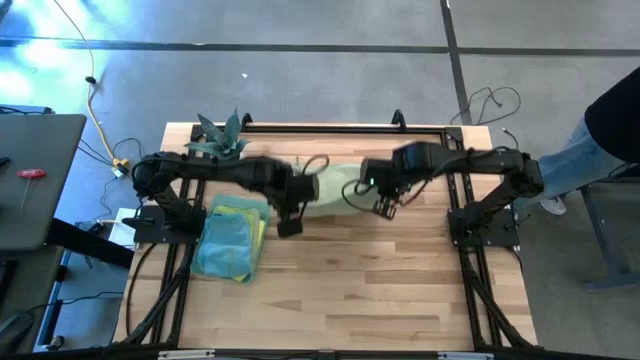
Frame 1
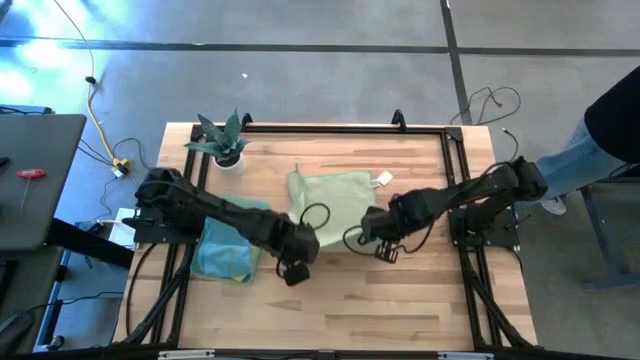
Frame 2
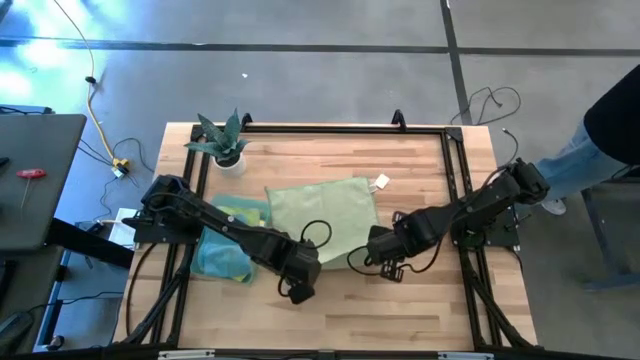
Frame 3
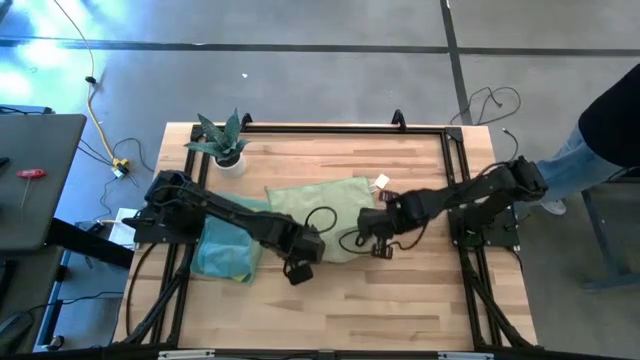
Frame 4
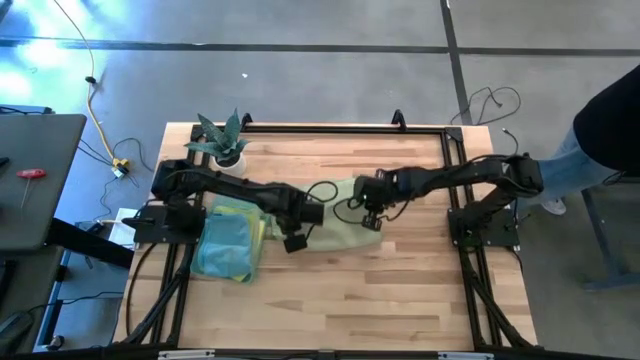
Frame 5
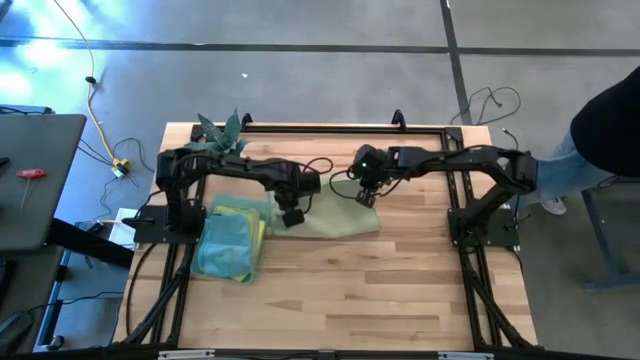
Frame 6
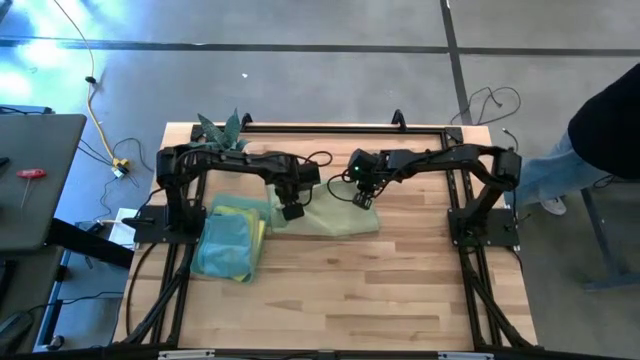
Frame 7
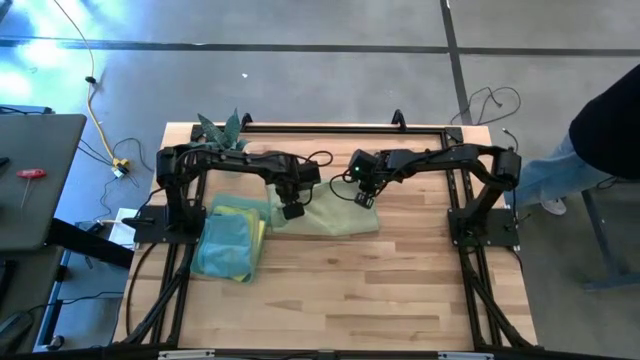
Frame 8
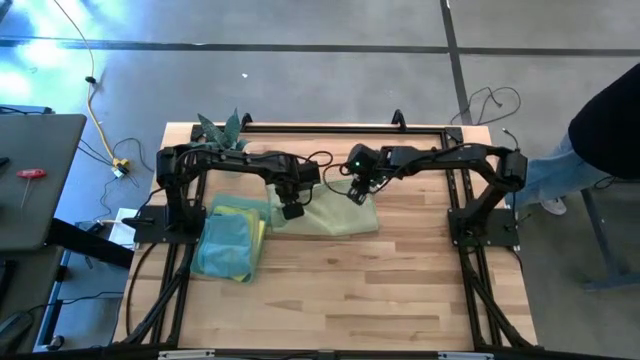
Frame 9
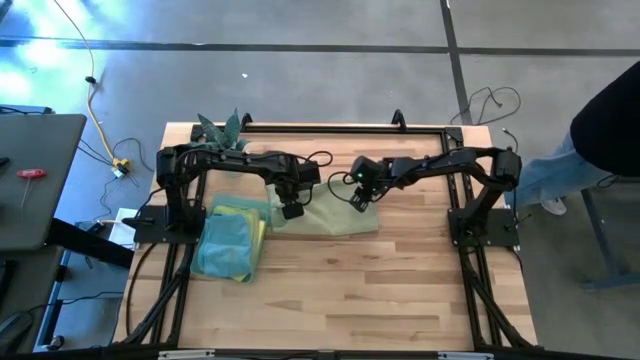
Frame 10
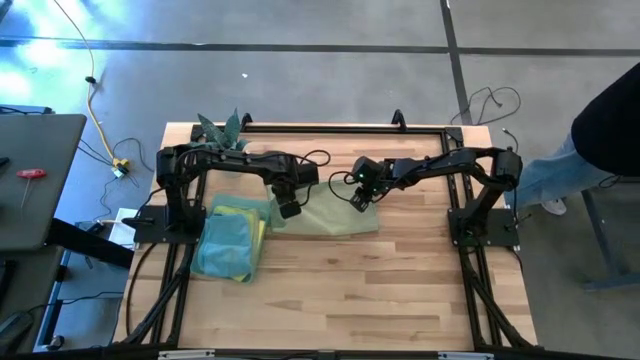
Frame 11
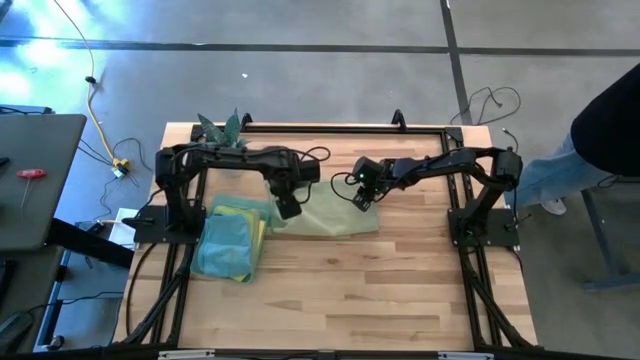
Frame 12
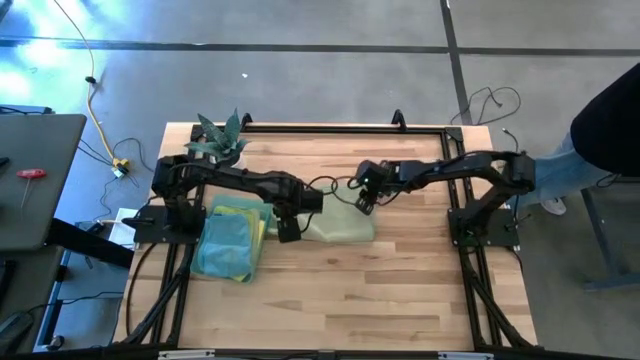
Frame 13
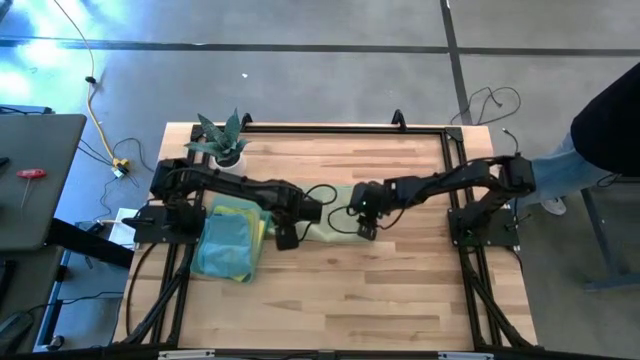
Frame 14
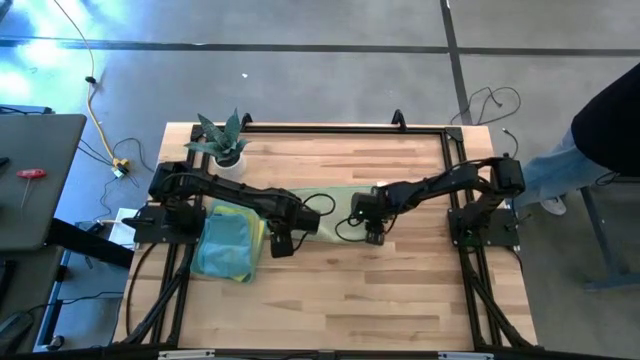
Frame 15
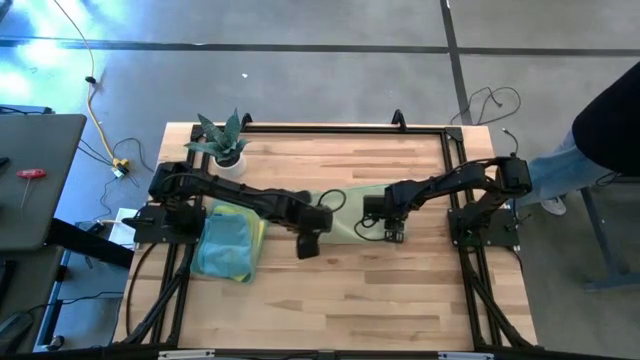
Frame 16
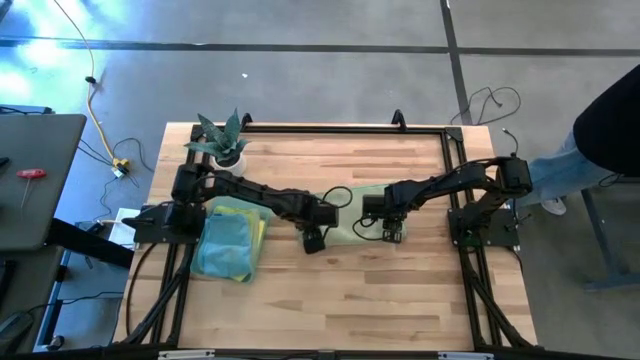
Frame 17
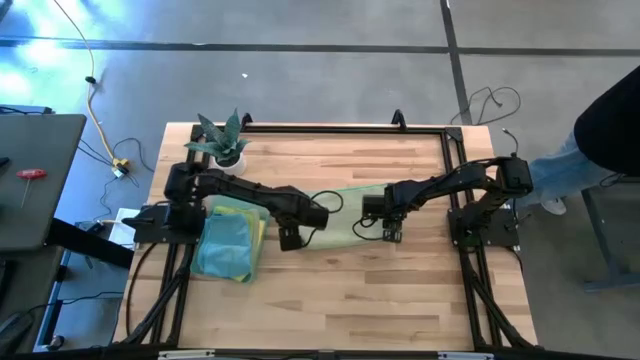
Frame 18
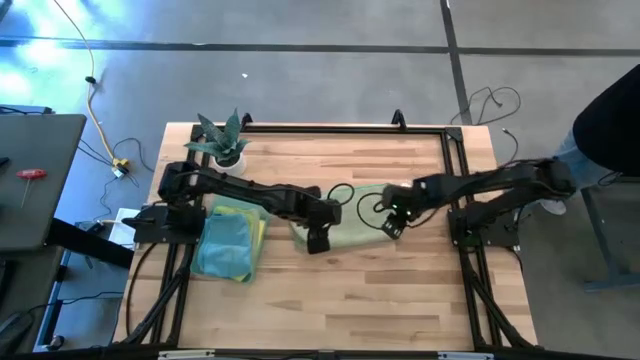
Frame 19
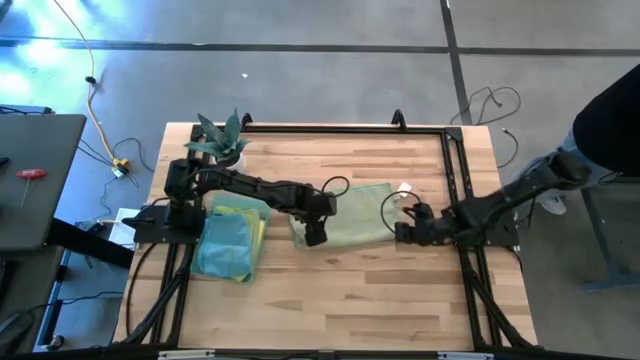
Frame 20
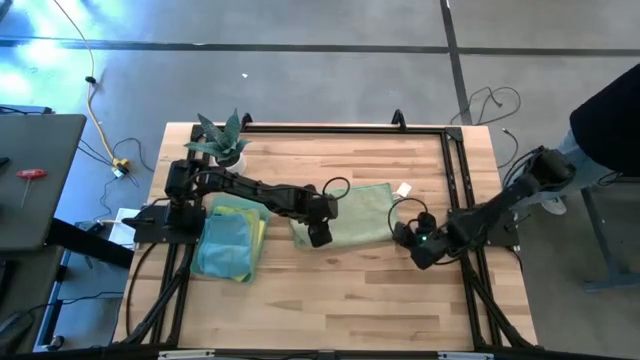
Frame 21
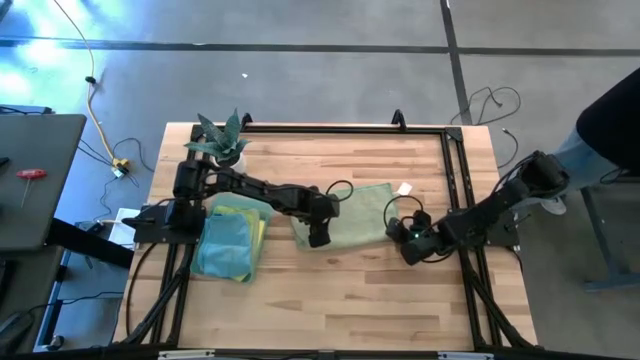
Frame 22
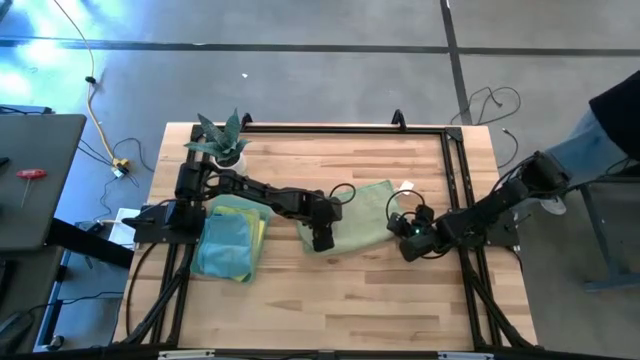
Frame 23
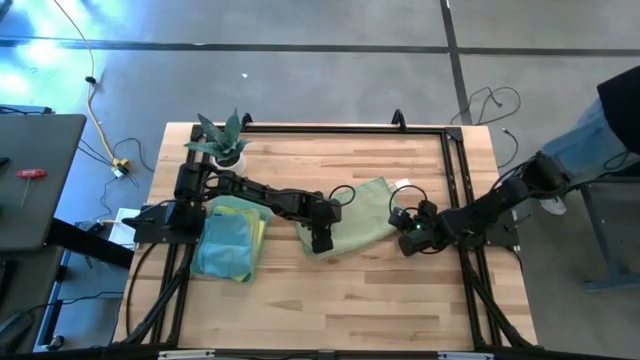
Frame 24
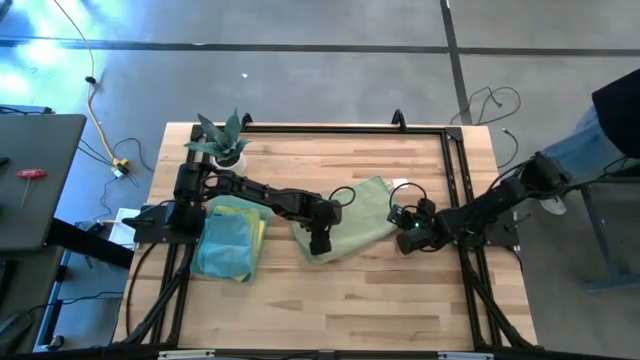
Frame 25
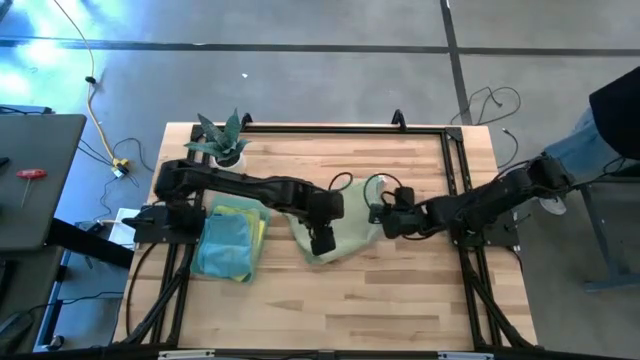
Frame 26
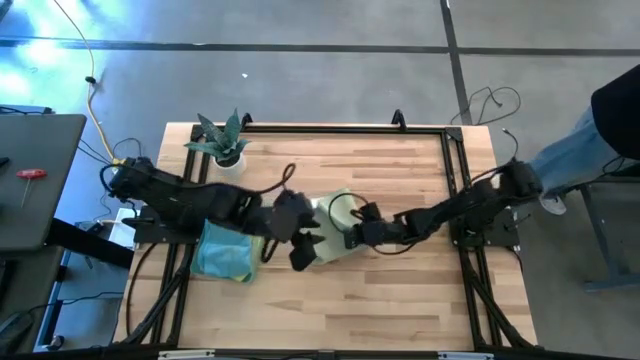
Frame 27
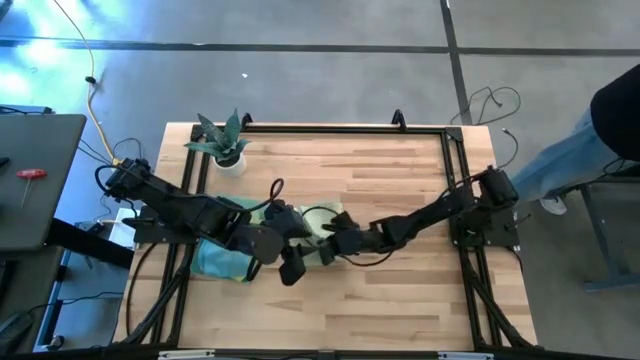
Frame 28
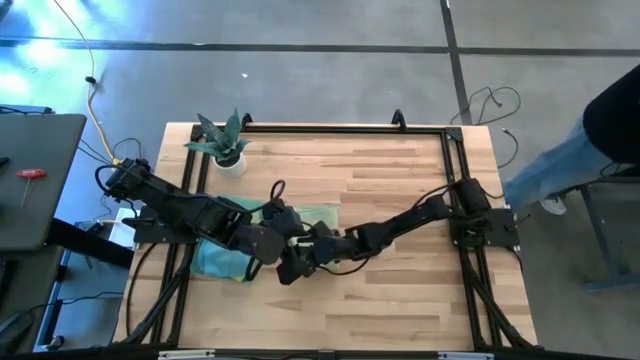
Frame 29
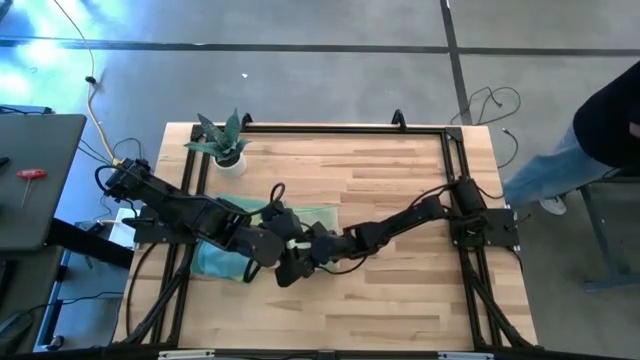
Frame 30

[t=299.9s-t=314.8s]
Task: Fold microfiber towels
Fold the green microfiber towel

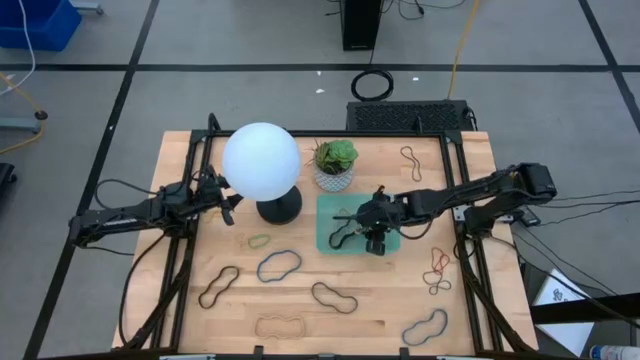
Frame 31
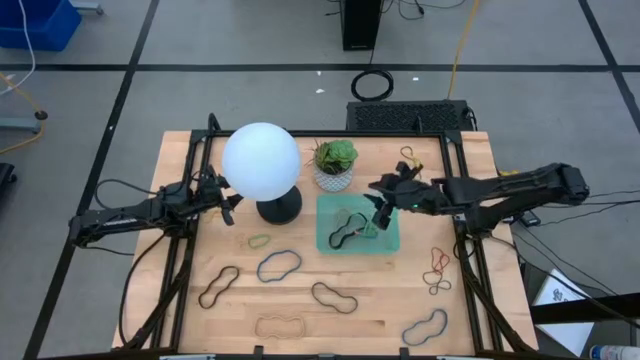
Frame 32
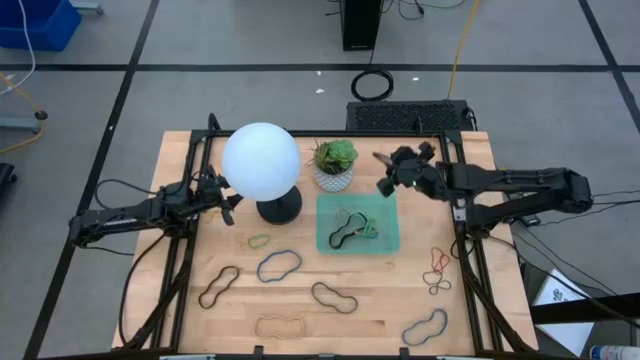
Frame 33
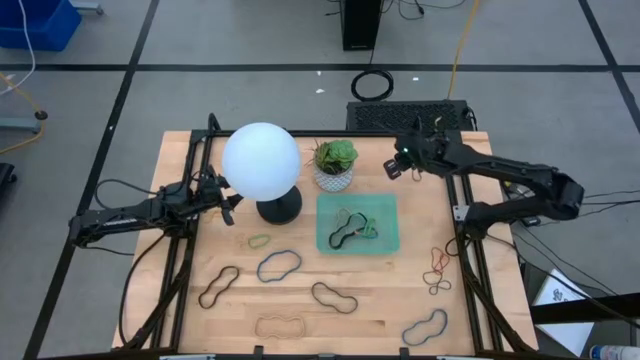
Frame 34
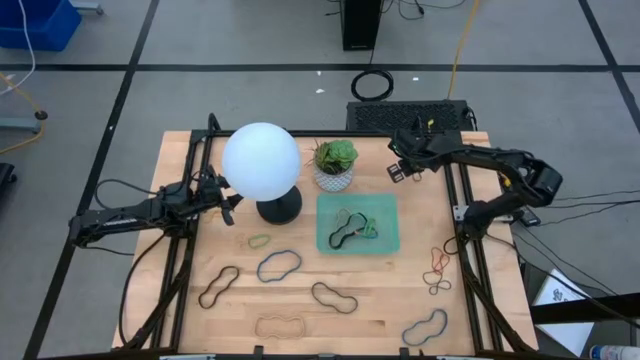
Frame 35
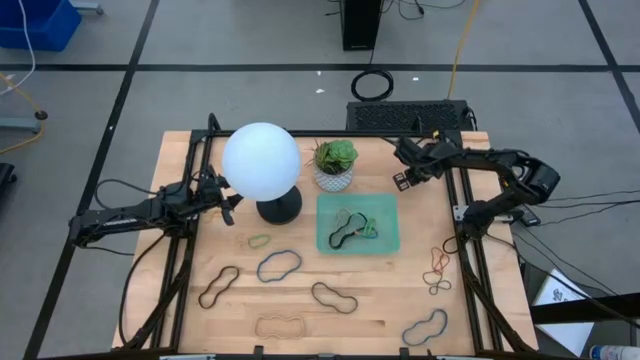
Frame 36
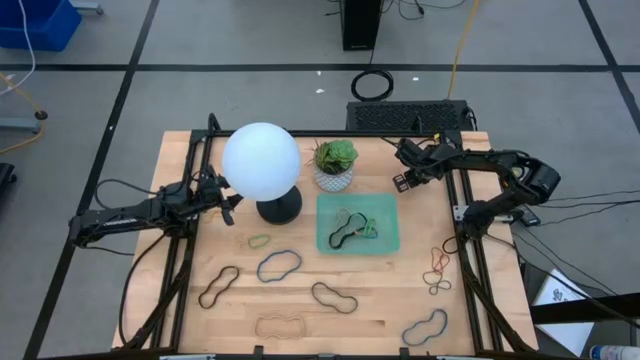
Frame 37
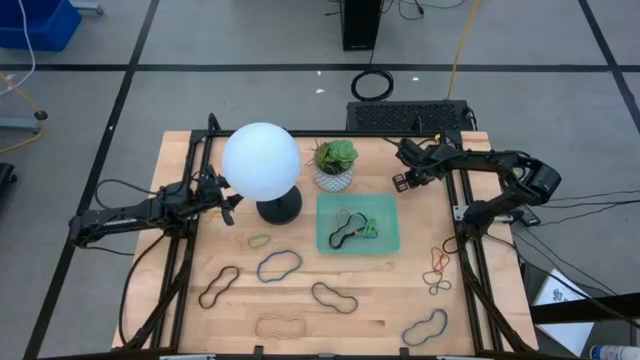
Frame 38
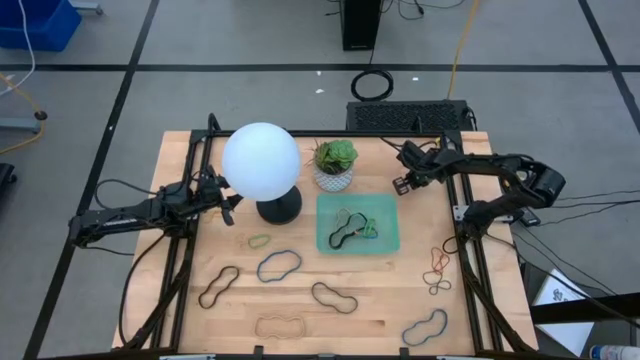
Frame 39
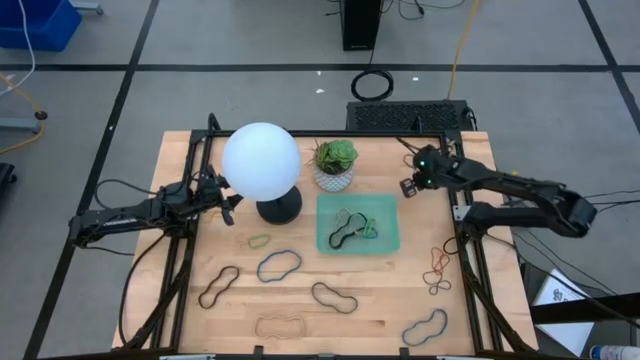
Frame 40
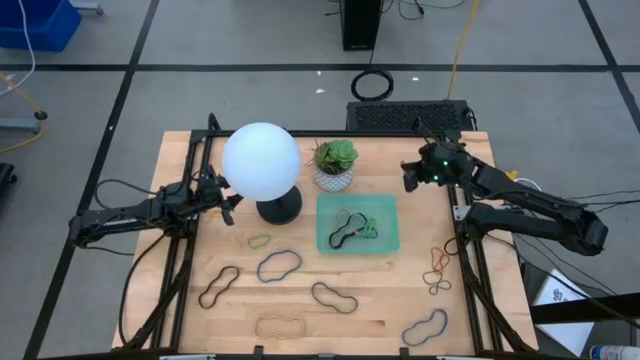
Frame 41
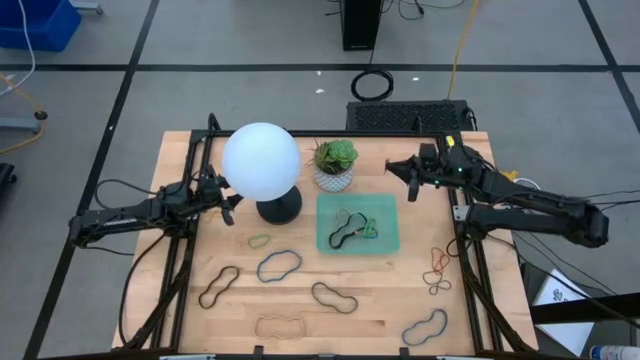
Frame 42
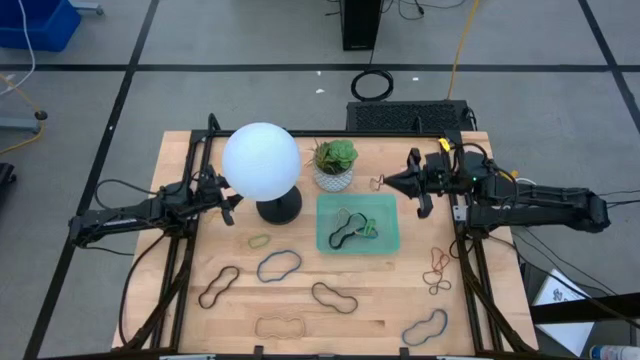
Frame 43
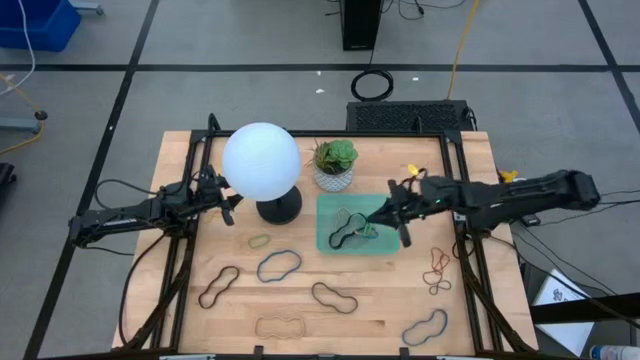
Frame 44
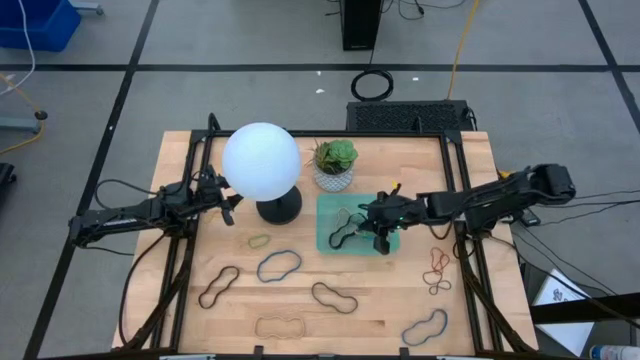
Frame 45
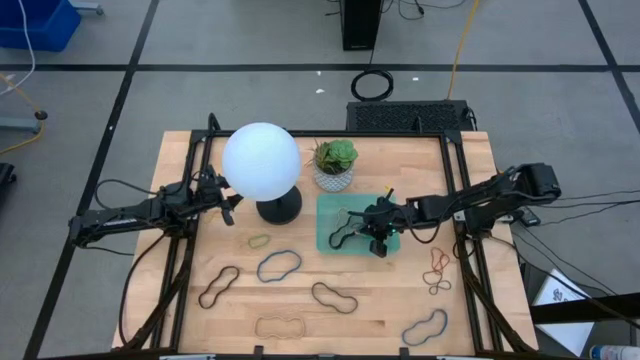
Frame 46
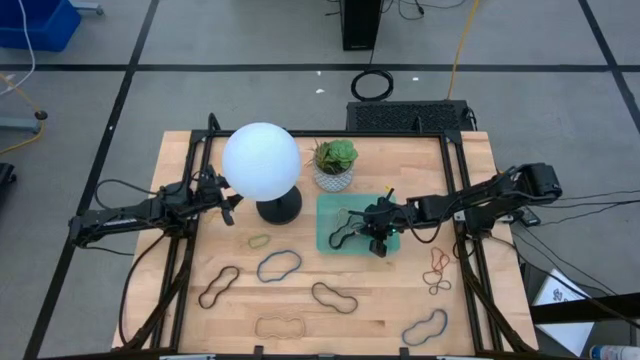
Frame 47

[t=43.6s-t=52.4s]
Task: Pick and place rubber bands into bin
Put the top violet rubber band into the blue bin
